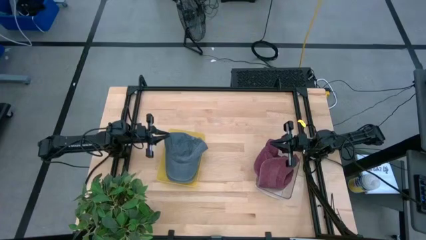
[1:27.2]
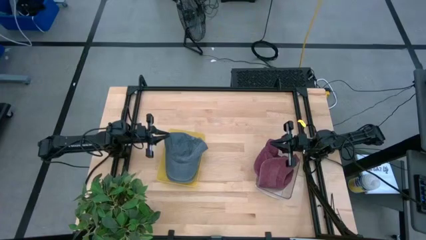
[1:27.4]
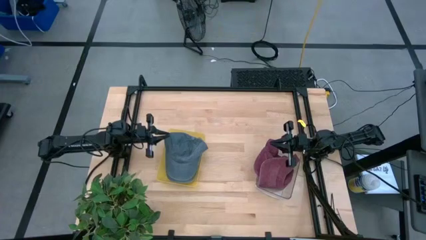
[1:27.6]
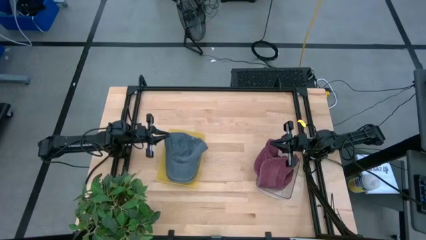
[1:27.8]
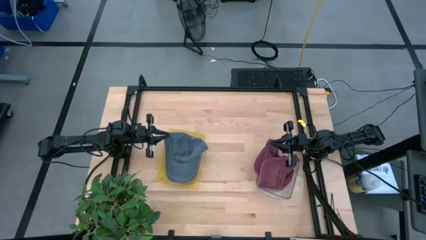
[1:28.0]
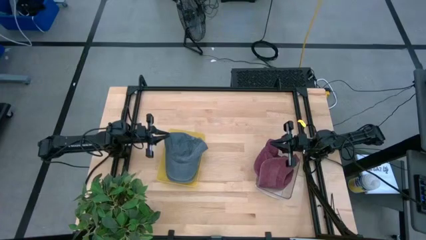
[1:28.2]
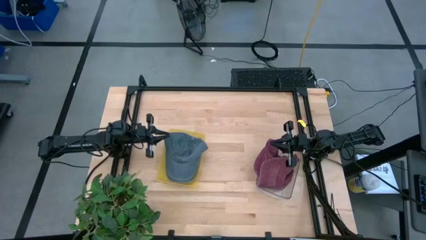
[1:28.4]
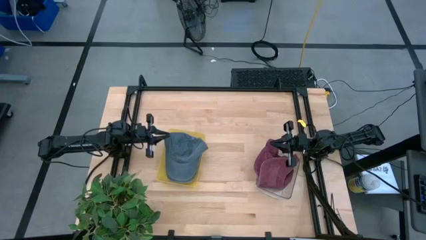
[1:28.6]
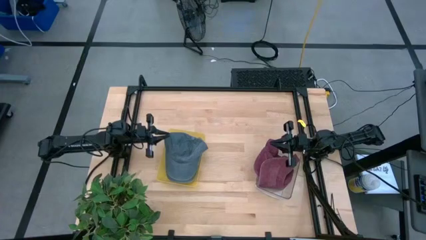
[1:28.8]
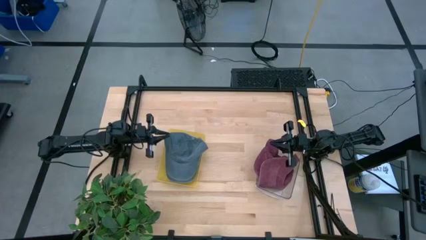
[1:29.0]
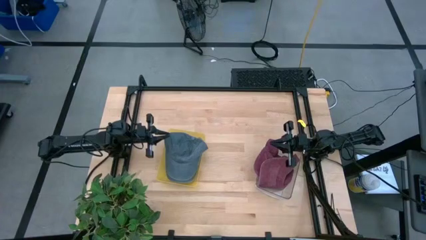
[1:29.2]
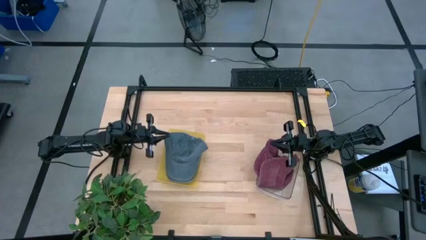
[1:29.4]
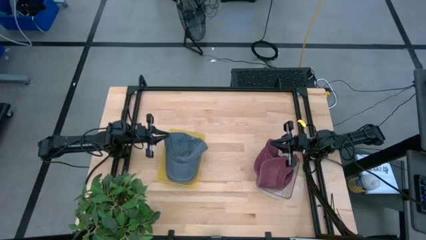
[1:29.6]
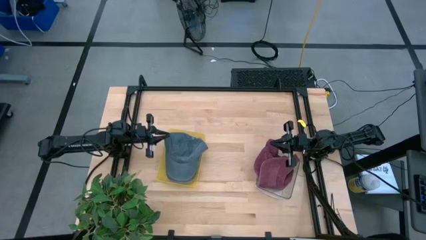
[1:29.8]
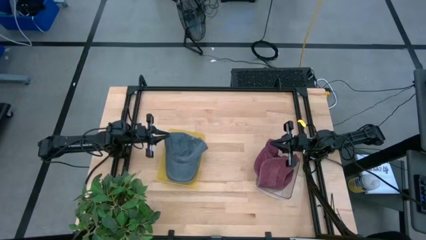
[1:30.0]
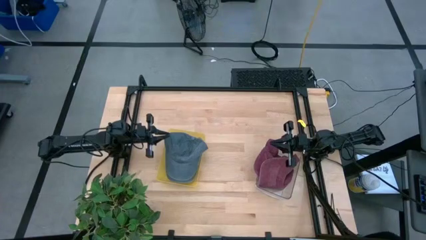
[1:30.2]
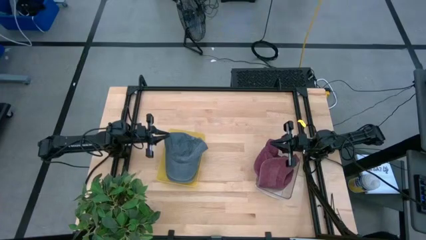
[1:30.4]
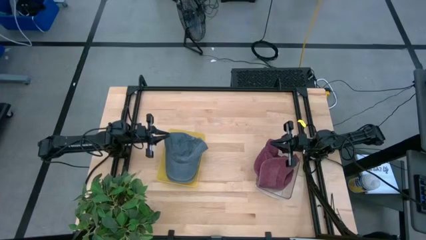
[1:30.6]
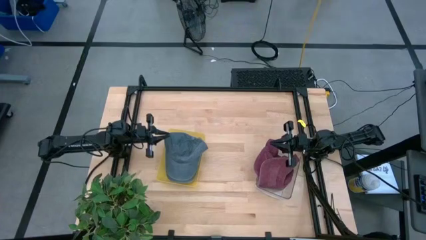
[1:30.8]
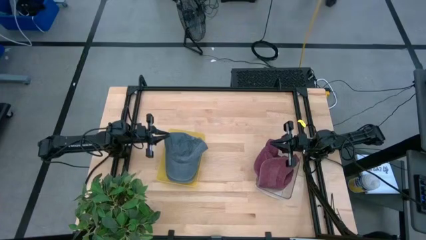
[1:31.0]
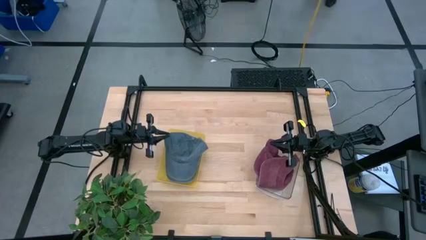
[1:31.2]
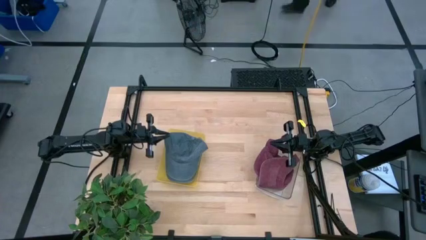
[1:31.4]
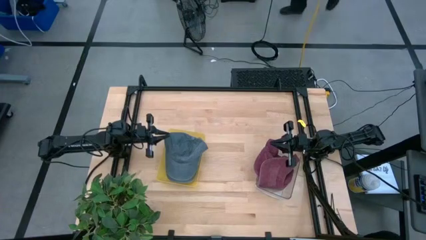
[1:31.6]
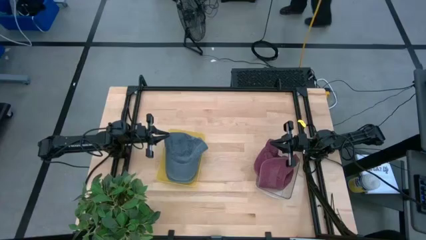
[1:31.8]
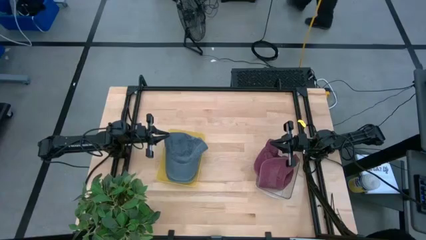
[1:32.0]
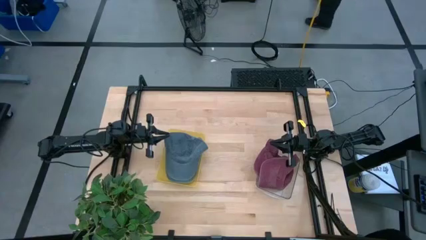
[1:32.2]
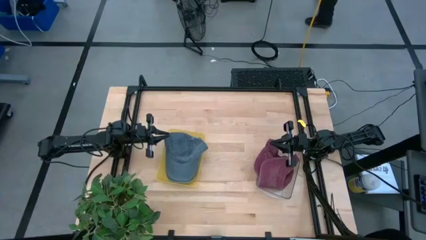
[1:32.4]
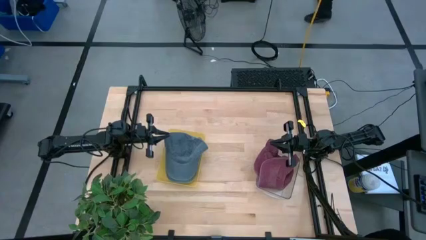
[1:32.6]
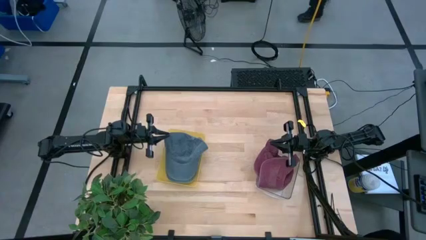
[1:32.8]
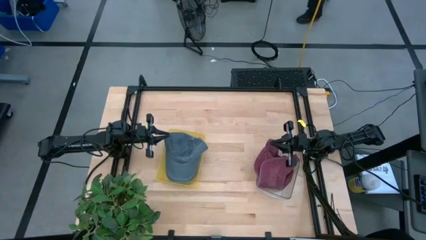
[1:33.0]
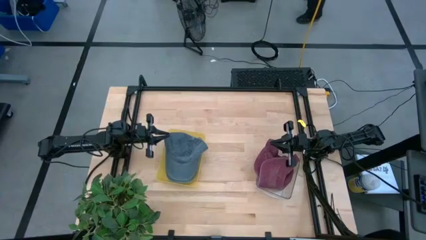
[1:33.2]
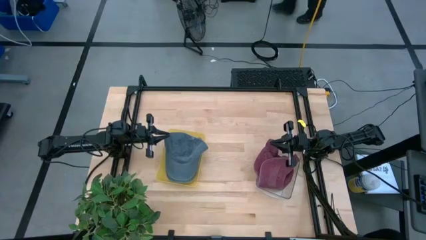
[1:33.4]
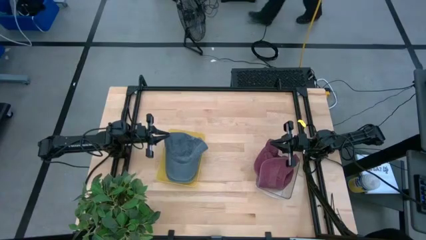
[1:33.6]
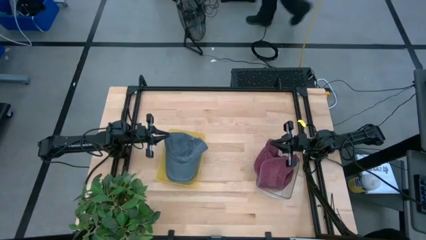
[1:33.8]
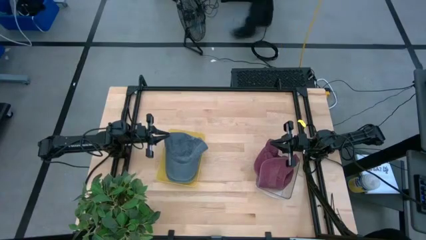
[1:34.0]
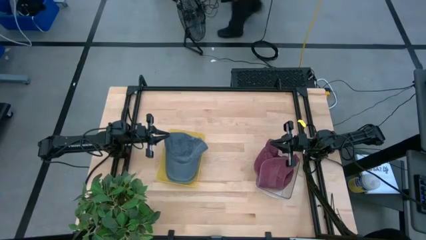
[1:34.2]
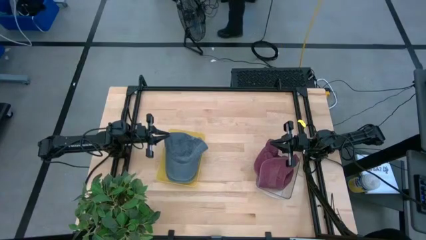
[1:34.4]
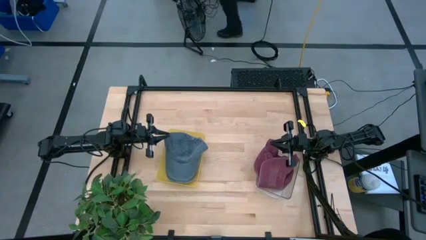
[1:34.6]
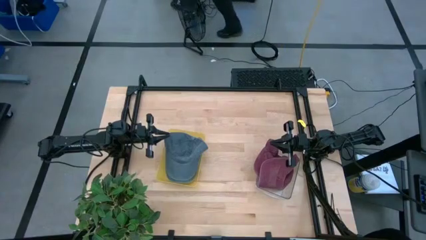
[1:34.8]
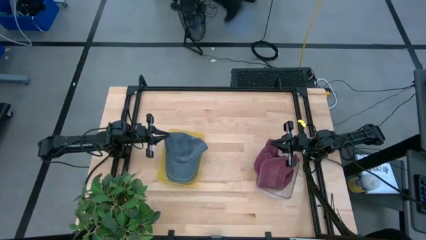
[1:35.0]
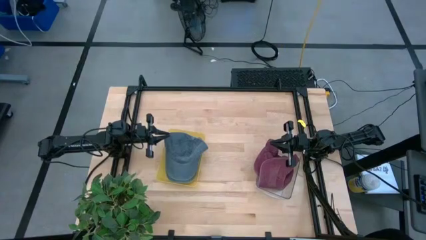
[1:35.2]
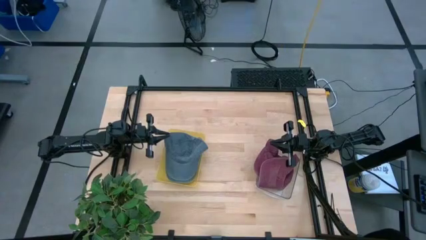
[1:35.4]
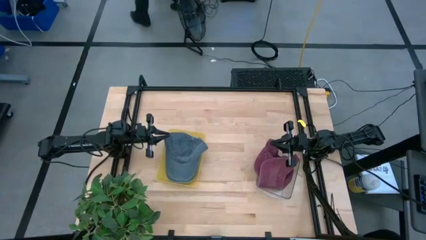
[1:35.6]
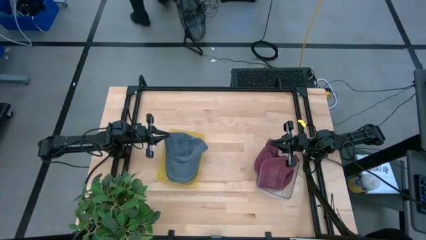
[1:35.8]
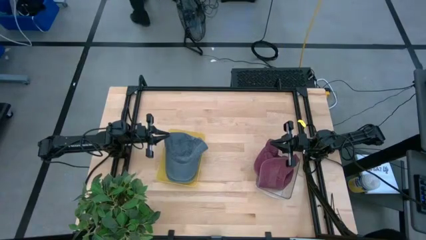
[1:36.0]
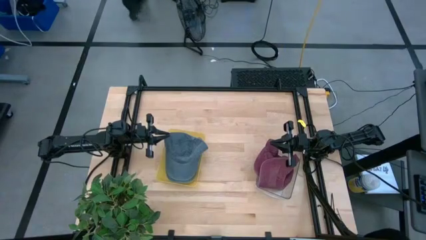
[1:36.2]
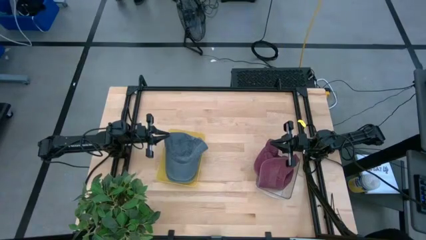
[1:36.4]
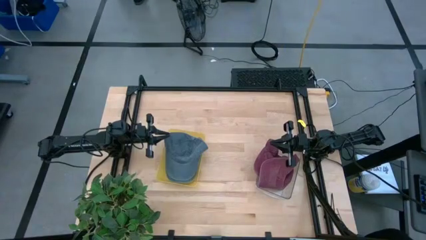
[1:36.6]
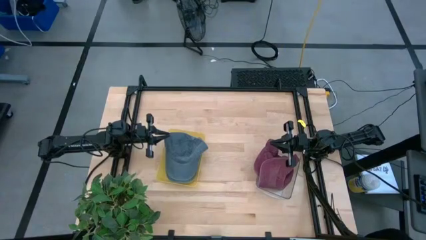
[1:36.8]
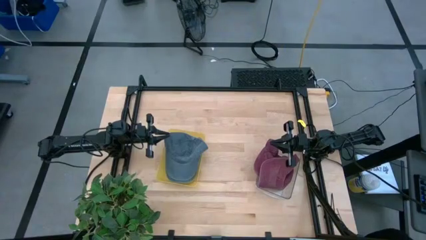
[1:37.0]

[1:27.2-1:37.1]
Task: Pick & Place hat
Return to Home Position

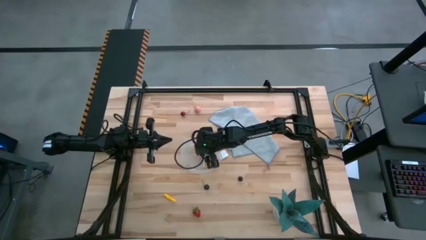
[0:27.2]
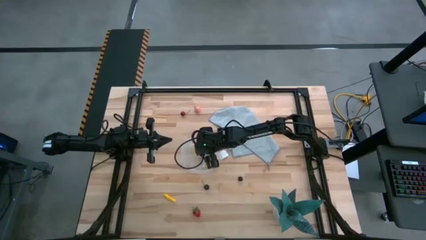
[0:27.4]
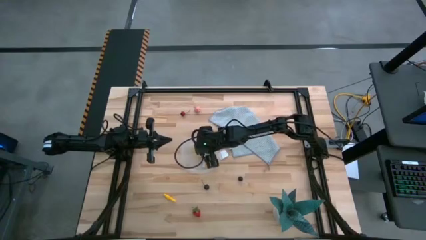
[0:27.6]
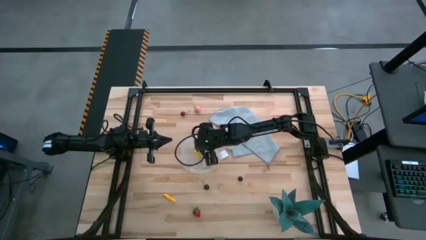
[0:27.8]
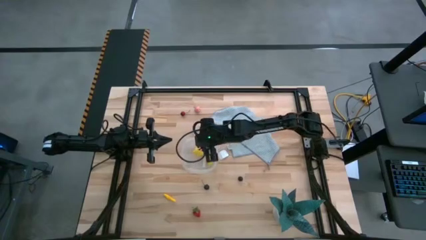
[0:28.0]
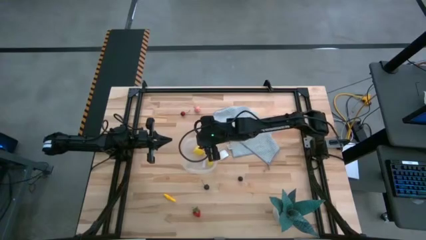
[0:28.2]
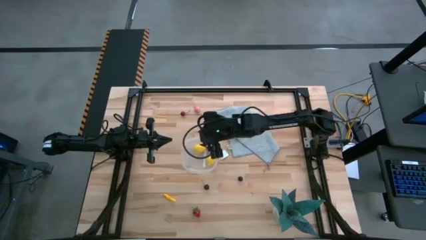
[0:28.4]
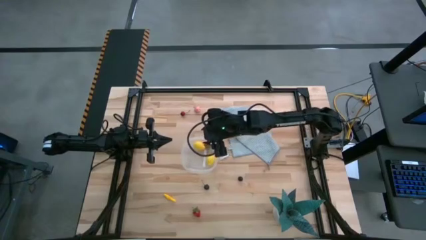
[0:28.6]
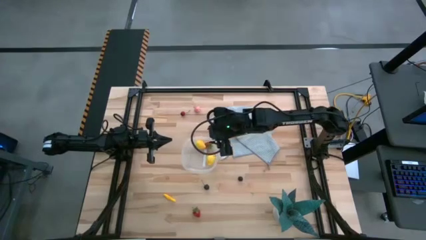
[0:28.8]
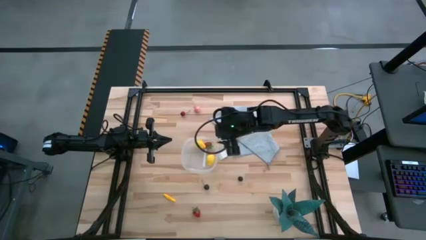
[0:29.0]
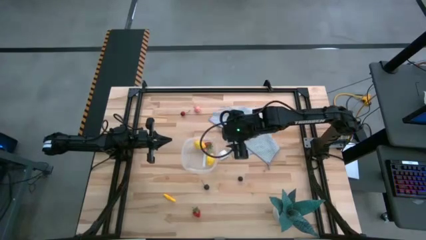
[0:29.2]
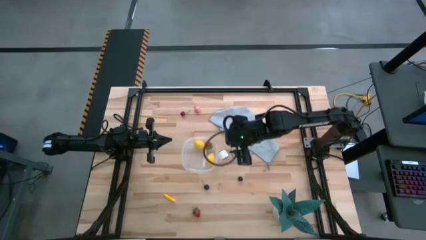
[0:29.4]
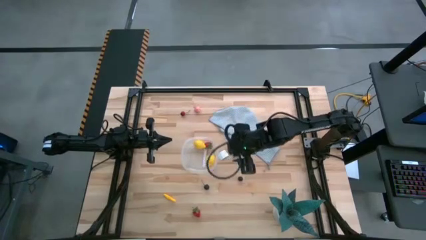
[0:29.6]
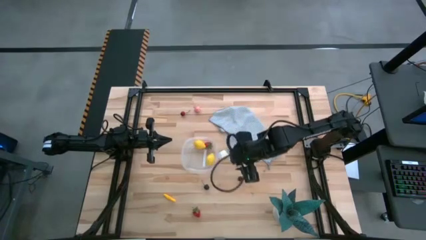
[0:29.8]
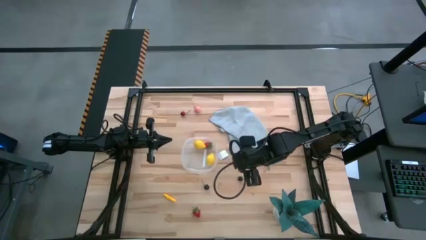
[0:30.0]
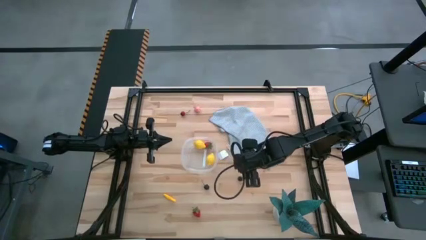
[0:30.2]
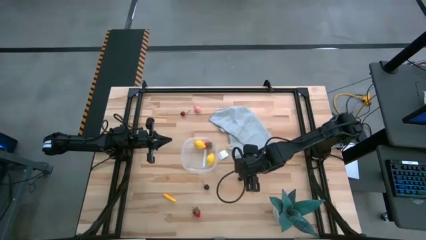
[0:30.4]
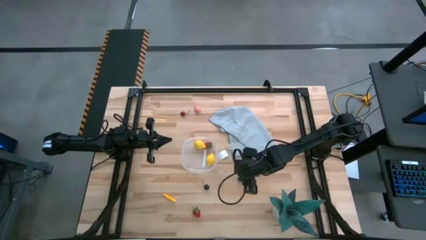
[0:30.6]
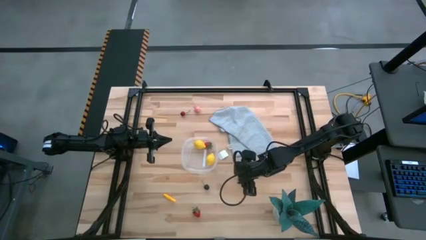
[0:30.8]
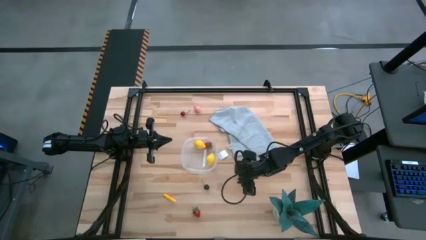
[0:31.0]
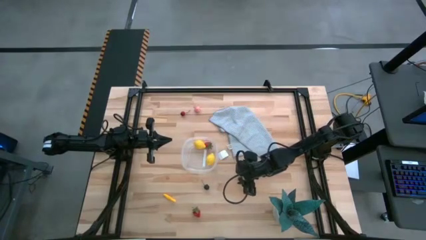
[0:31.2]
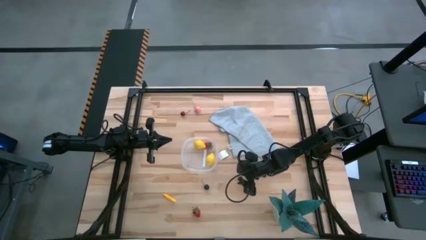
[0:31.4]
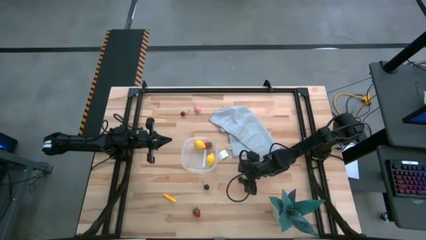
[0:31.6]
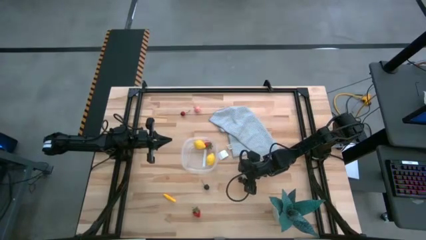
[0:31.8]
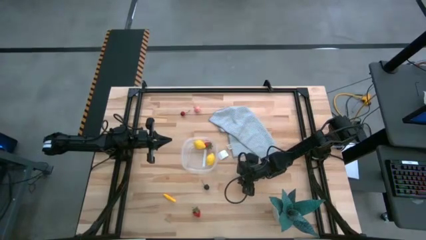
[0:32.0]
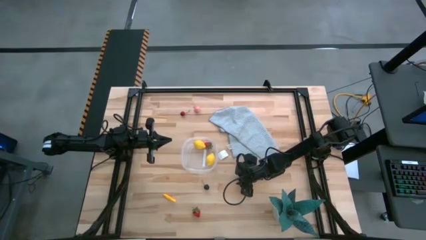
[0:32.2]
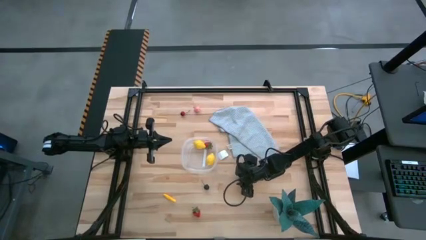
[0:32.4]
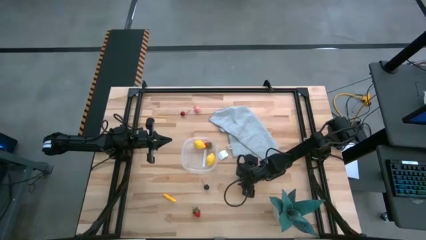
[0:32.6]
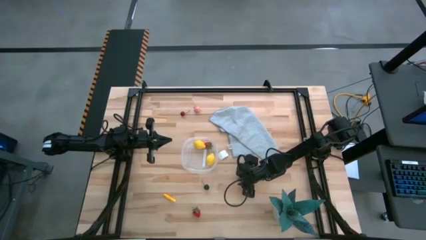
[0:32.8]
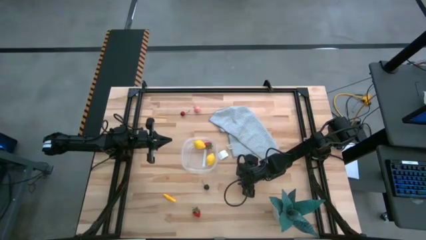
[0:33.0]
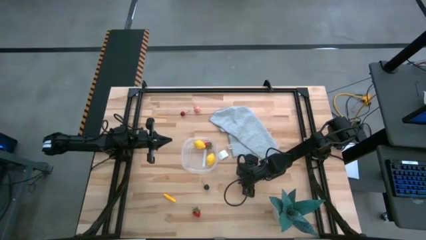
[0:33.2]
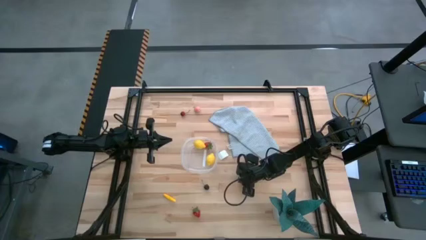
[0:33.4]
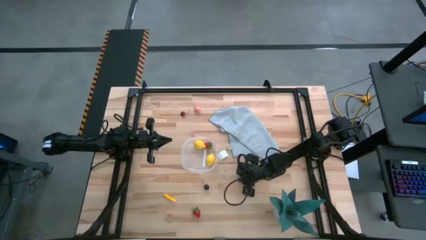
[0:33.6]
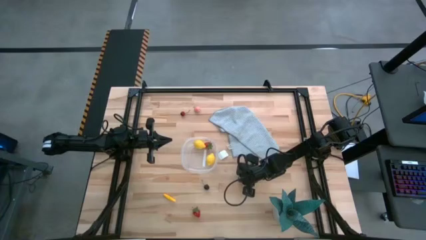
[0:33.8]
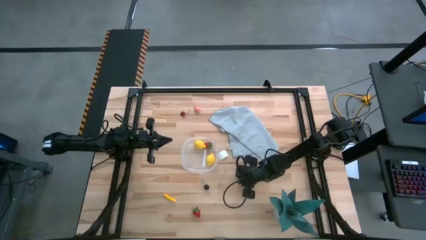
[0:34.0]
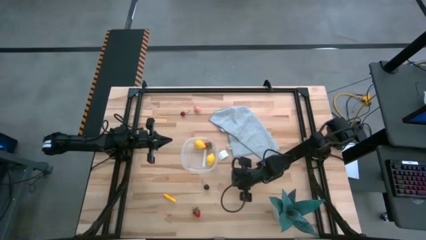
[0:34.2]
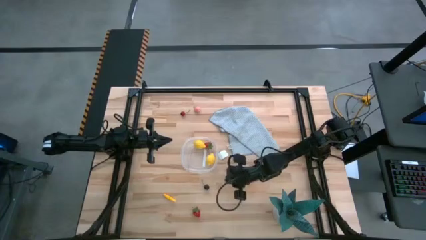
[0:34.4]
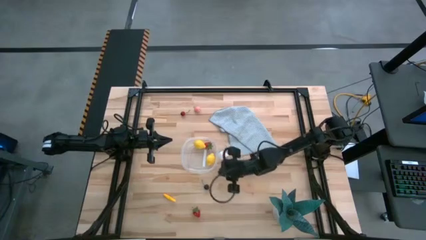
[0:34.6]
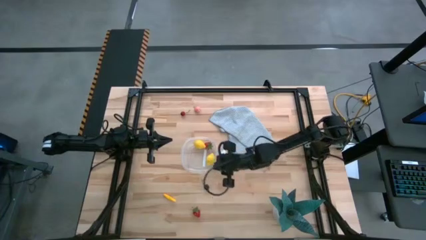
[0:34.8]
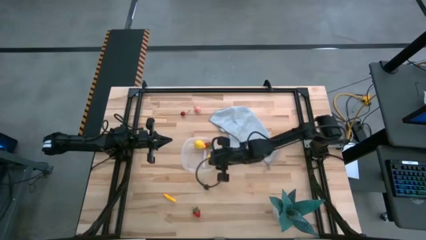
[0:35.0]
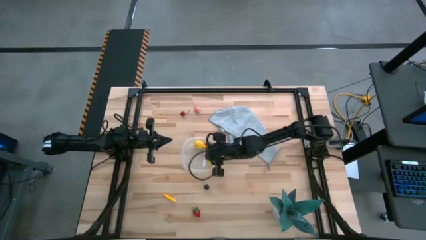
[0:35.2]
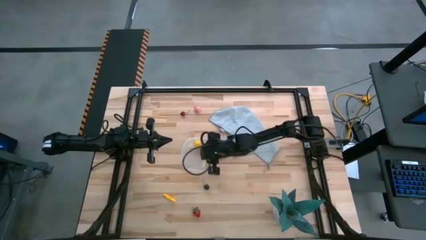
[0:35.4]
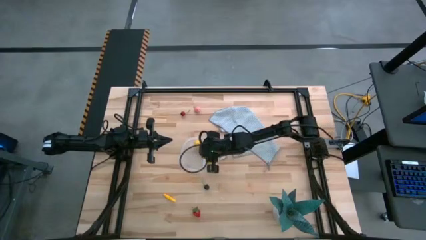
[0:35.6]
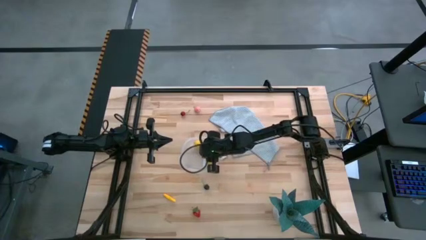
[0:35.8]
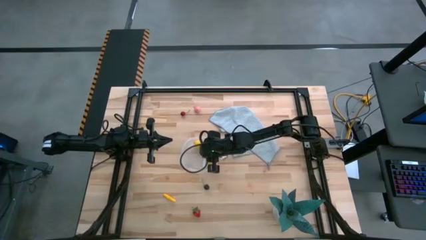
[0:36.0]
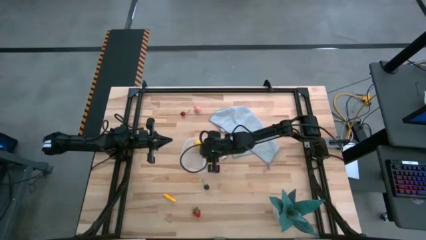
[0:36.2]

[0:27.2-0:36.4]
Task: Pick and placing Produce into tupperware
Put the blackberry into the transparent bin
